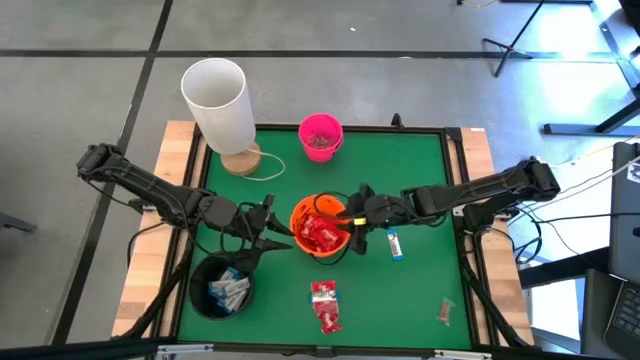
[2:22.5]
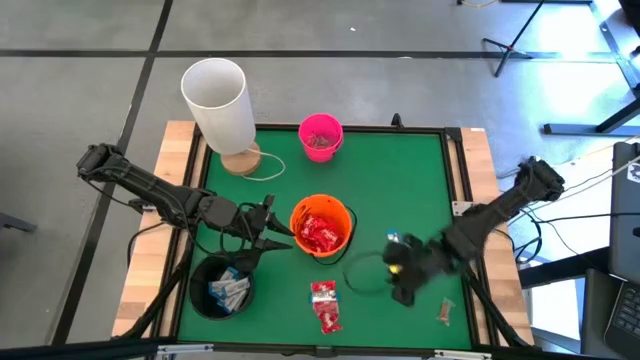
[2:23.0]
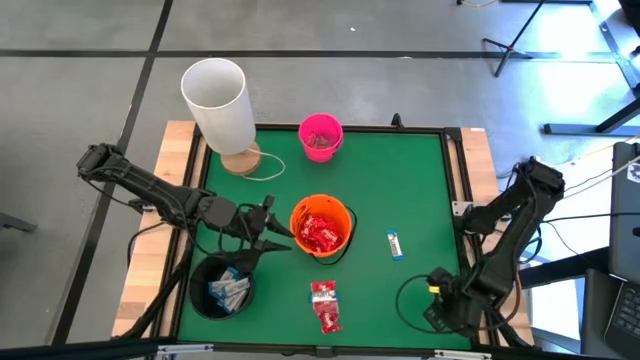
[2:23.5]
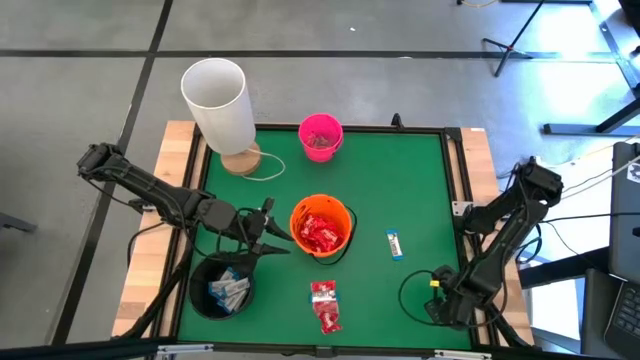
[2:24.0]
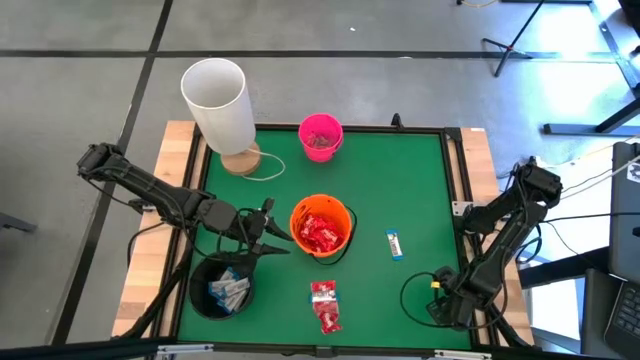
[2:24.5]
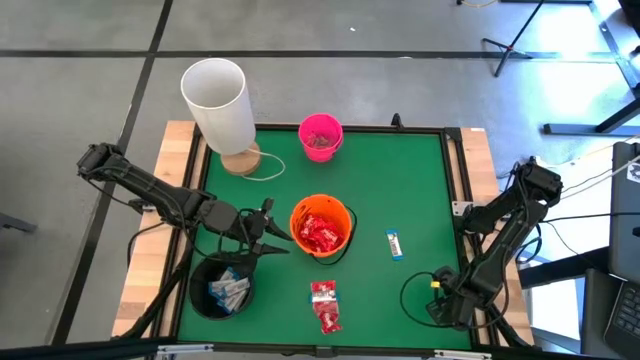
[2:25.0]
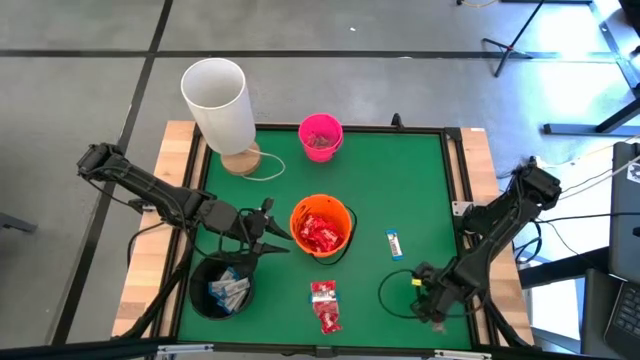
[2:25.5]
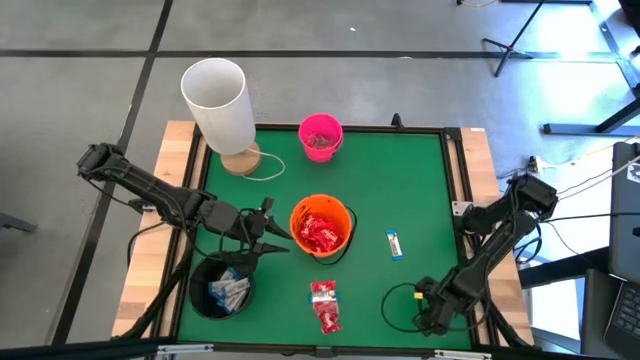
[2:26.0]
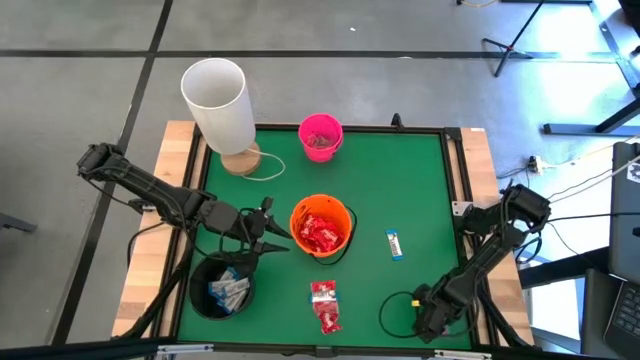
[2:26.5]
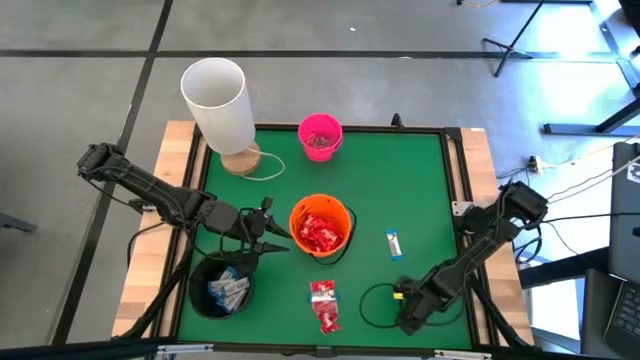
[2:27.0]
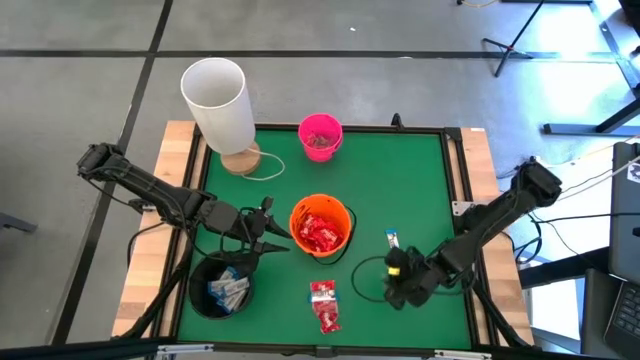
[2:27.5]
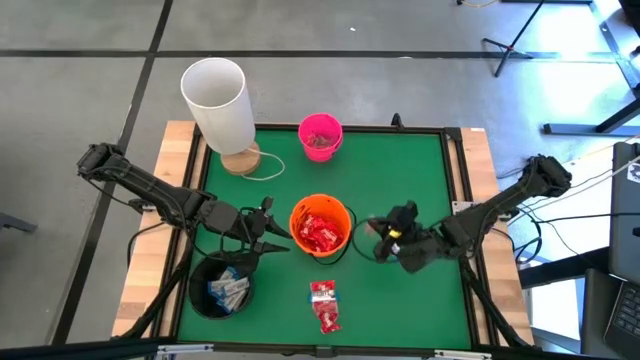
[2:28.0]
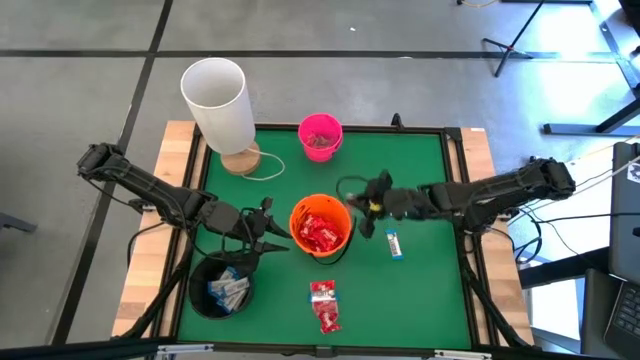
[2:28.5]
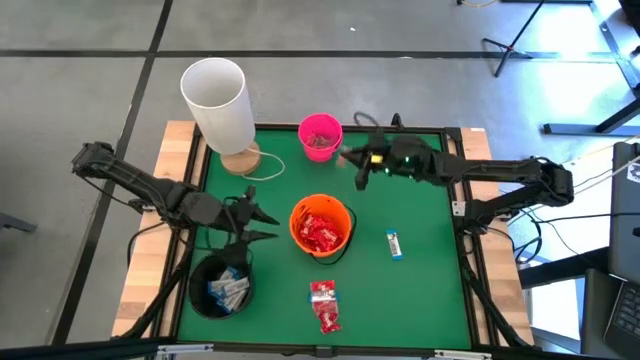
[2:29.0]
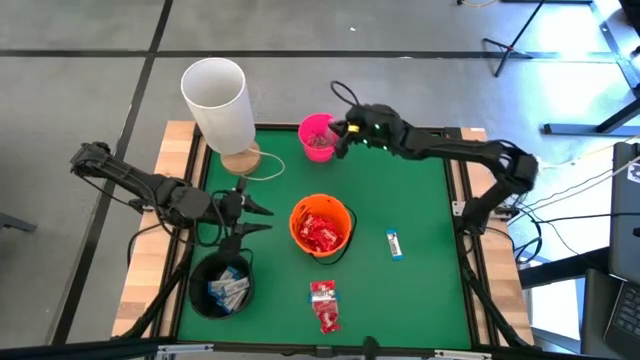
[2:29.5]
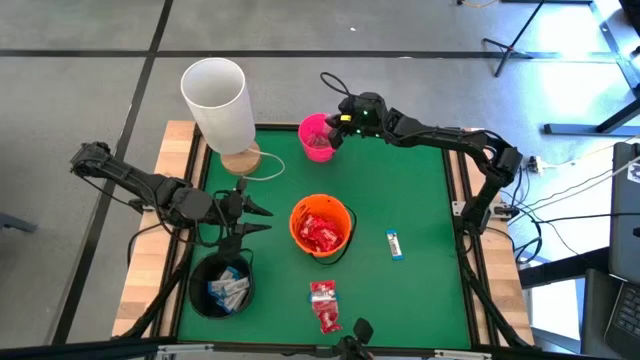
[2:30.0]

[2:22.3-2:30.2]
Task: Sort candy
Put the orange gummy into the pink bucket

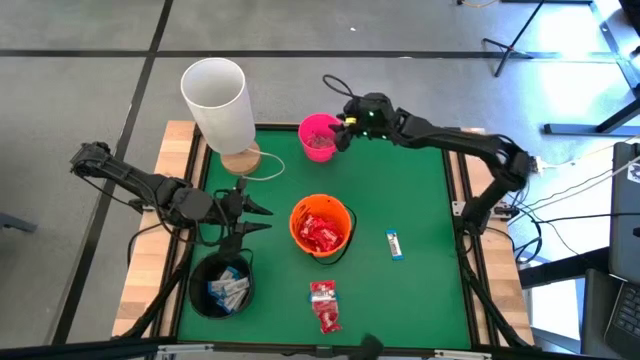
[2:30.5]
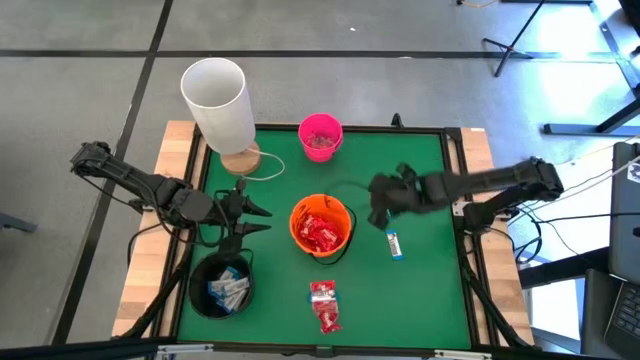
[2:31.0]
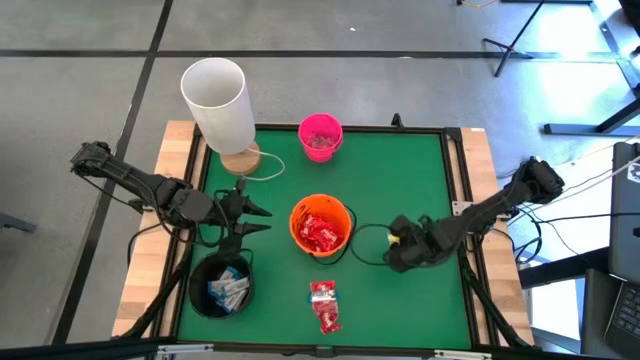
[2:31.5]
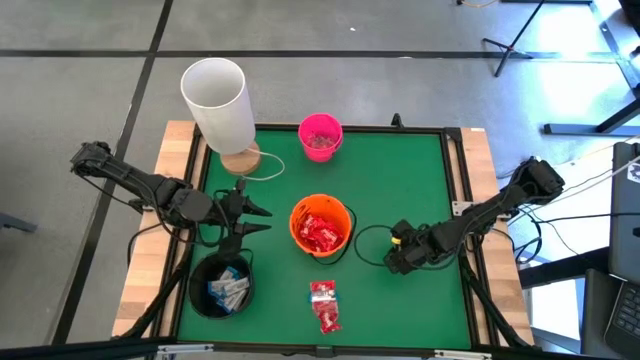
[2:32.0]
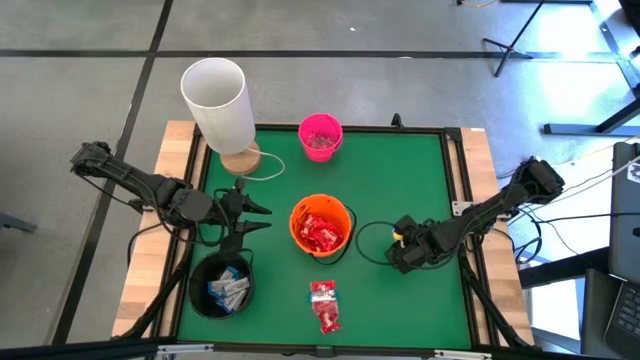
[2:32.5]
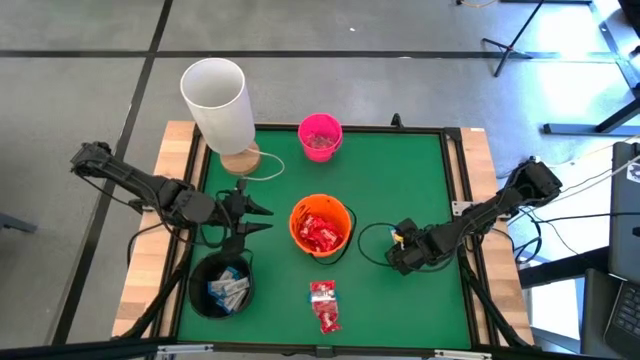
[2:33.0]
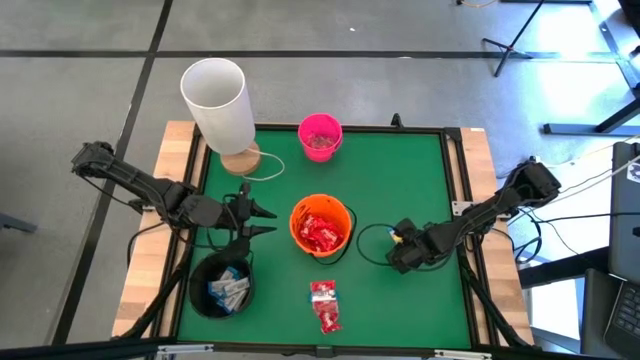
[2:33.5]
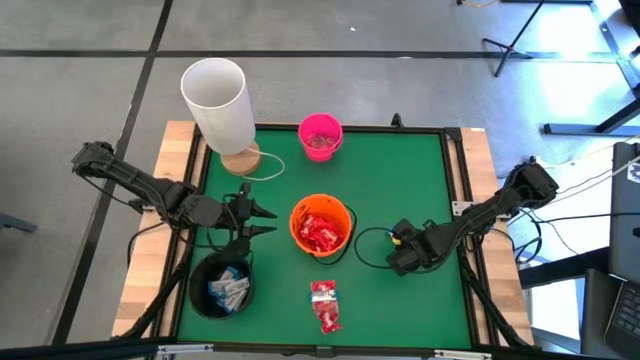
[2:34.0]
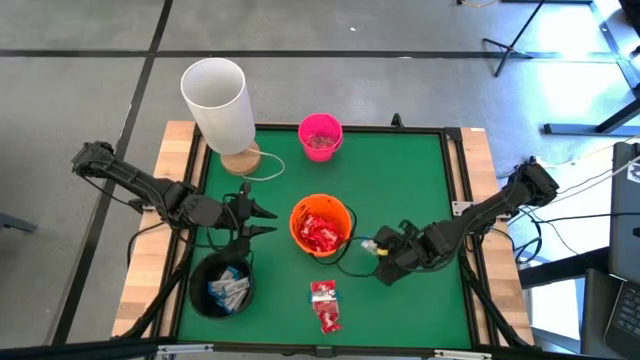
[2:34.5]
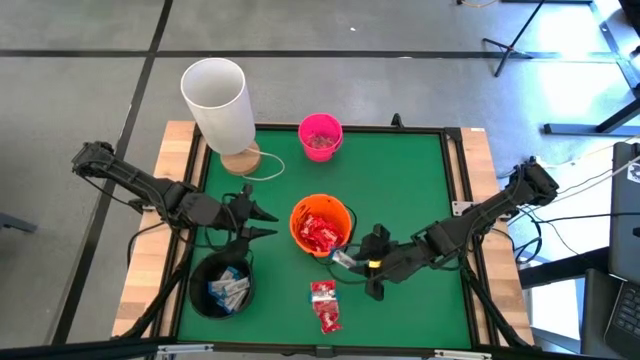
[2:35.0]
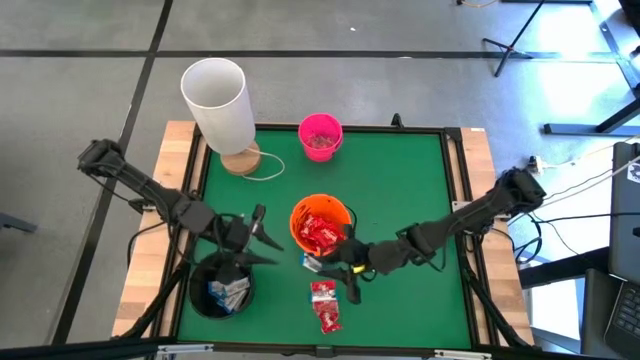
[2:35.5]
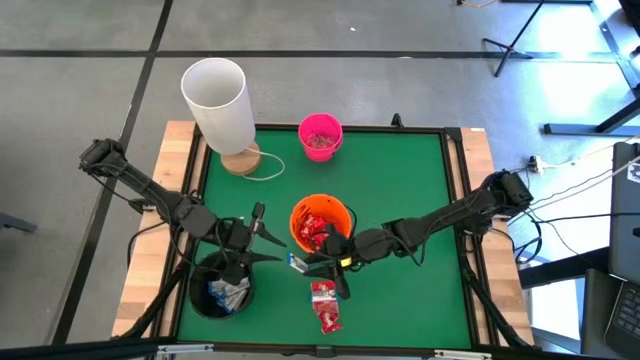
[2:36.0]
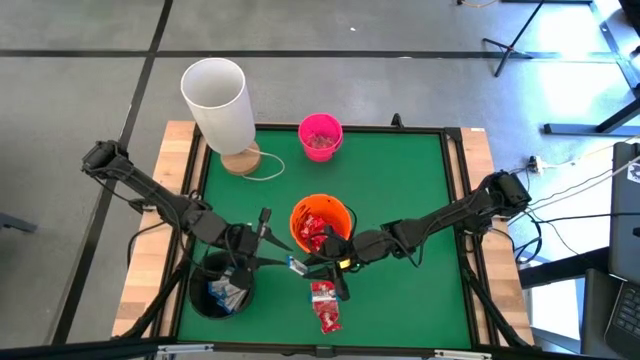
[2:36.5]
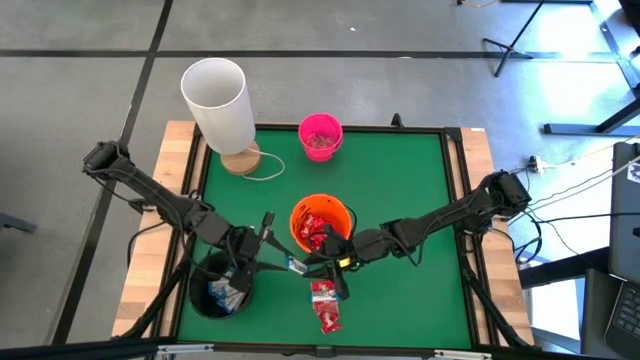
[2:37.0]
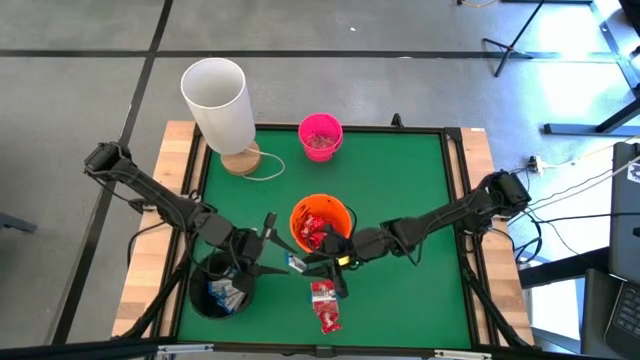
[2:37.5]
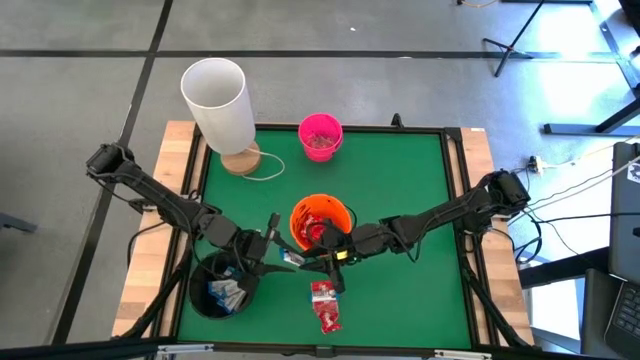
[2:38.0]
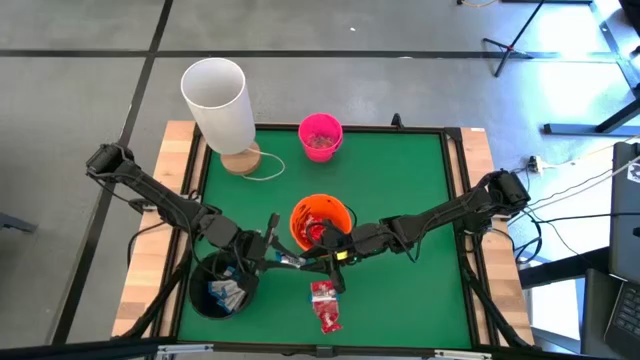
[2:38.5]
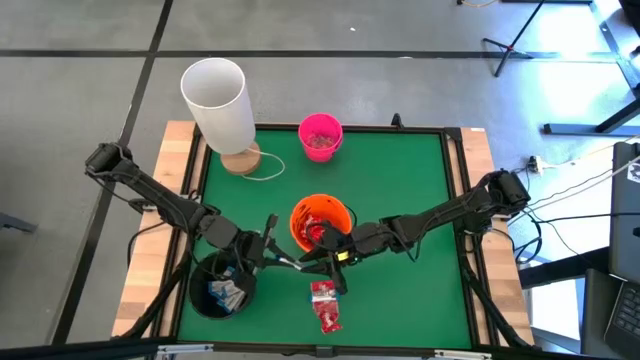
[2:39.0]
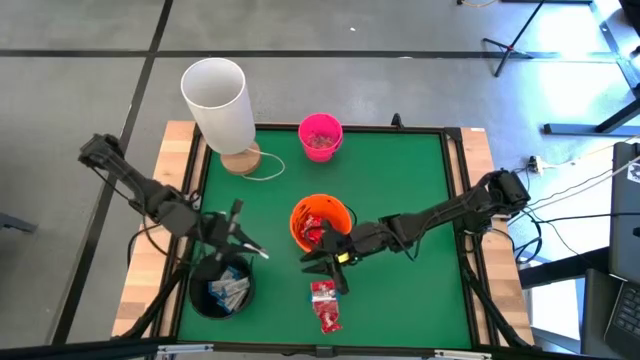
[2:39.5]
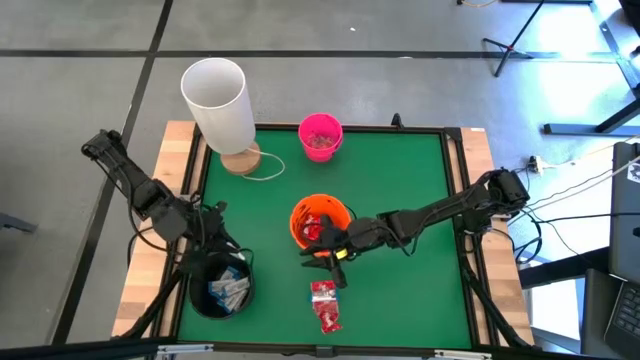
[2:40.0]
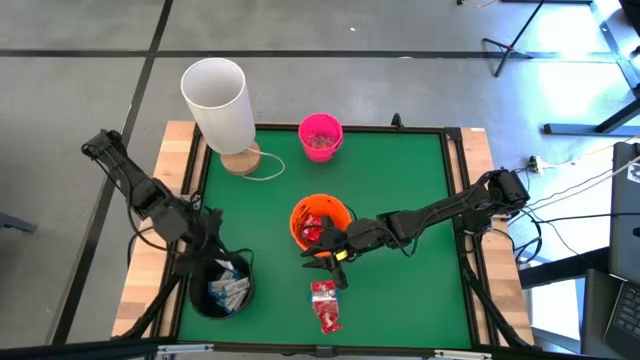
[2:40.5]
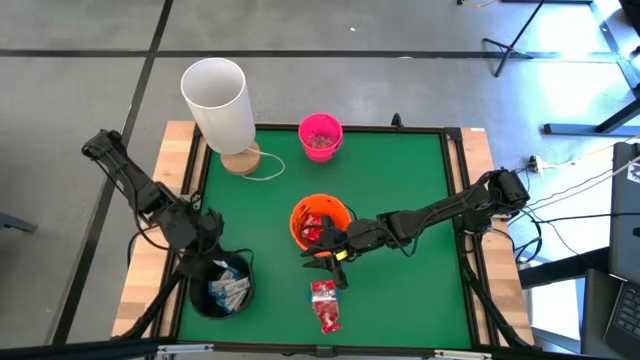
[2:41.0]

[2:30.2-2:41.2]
Put the white chocolate into the black bucket

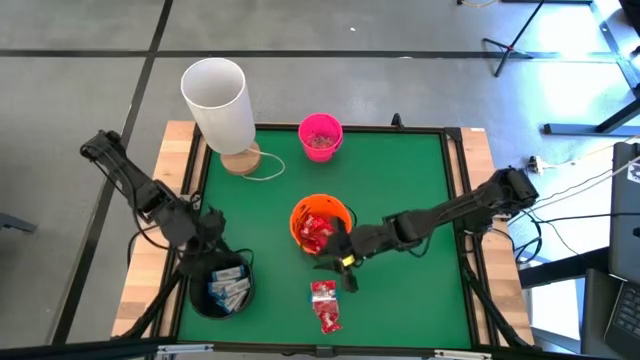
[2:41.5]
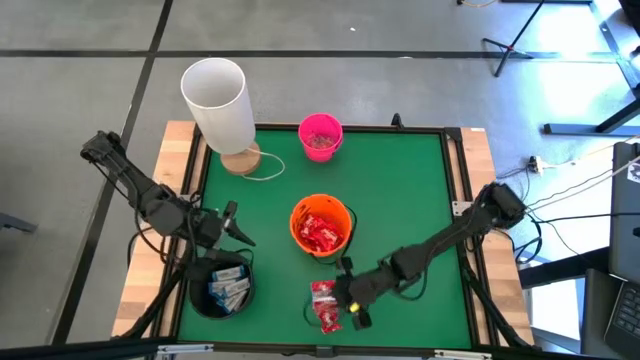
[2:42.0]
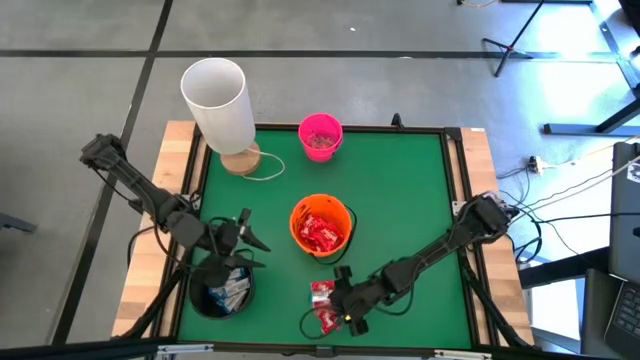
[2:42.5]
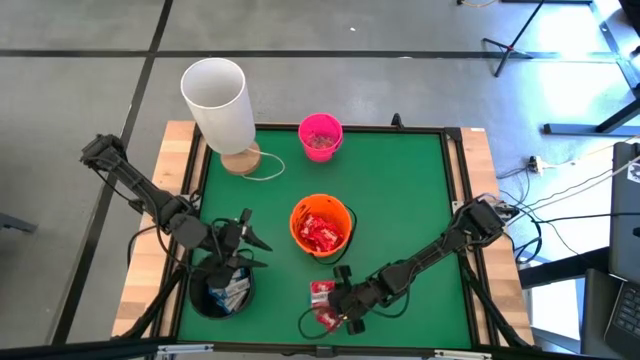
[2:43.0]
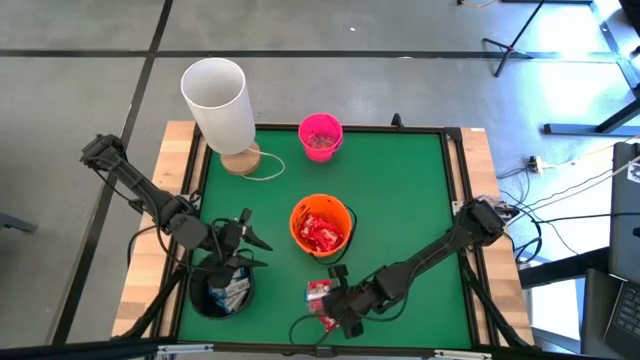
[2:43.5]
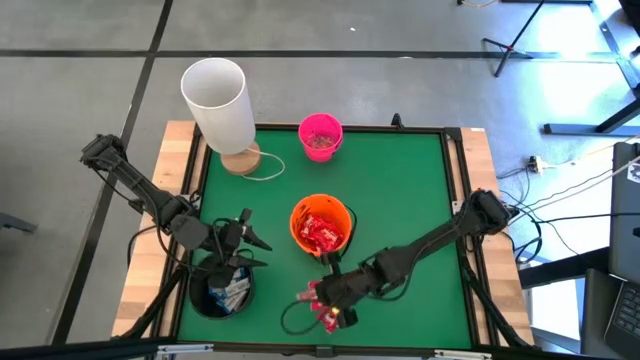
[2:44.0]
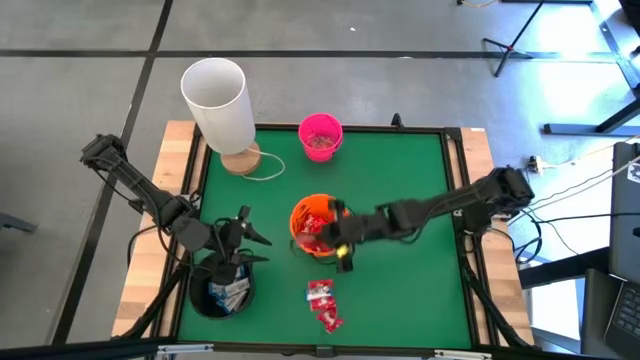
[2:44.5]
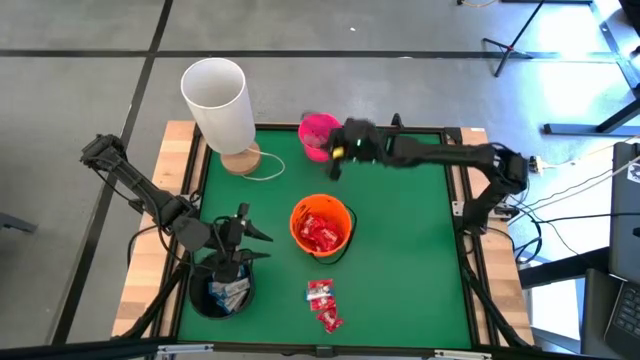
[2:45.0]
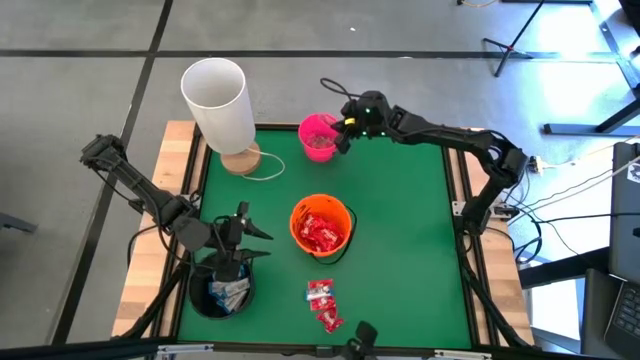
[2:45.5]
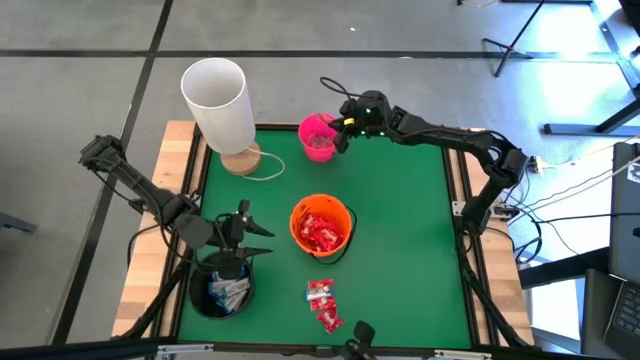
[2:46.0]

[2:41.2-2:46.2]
Put the orange gummy into the pink bucket
